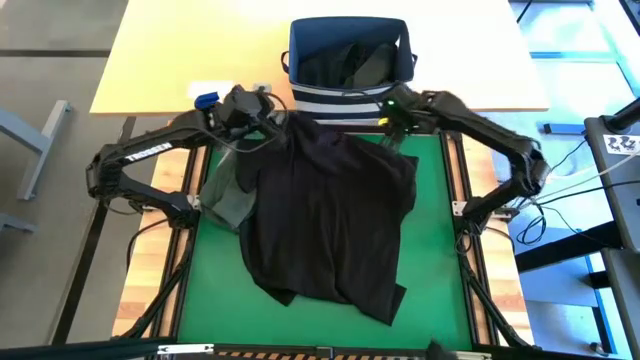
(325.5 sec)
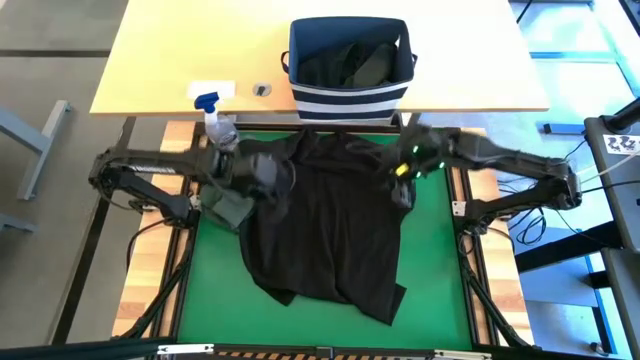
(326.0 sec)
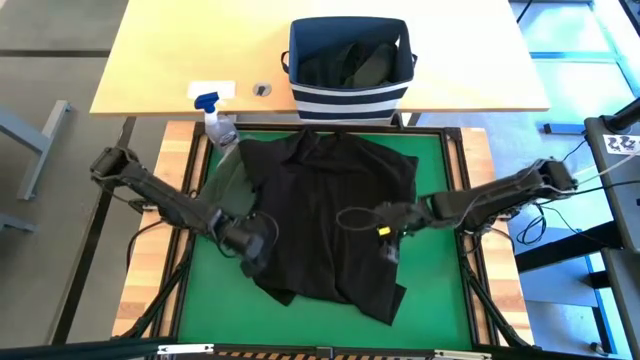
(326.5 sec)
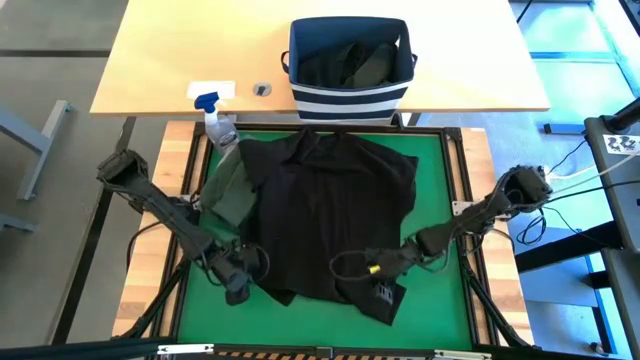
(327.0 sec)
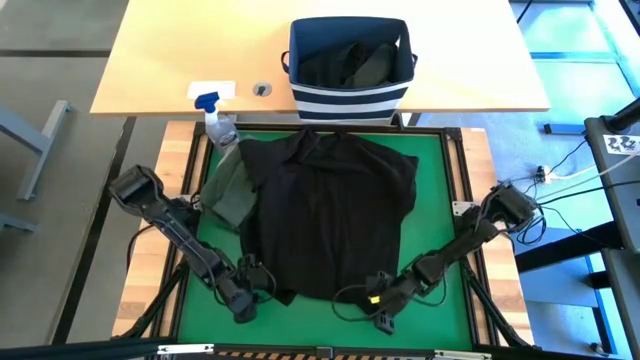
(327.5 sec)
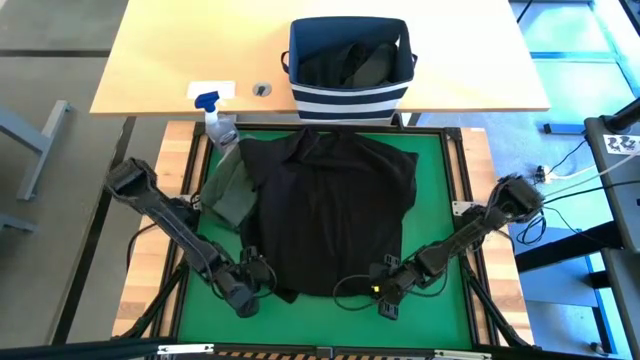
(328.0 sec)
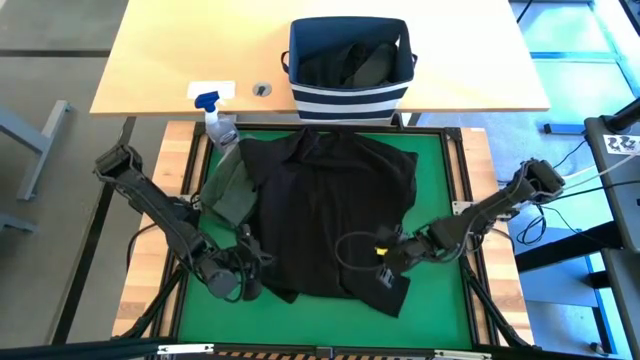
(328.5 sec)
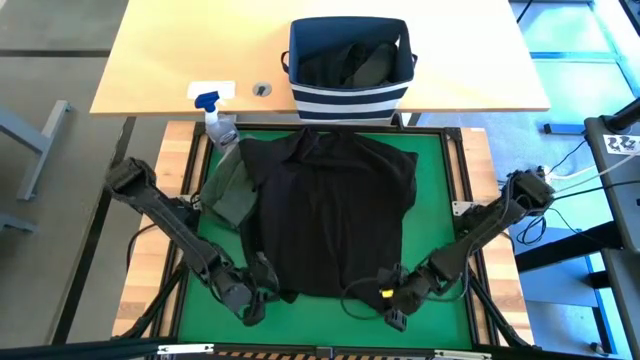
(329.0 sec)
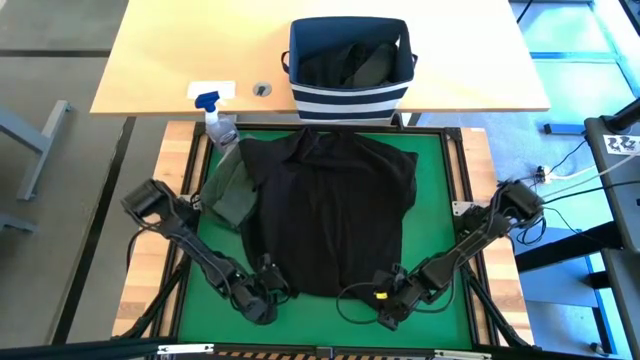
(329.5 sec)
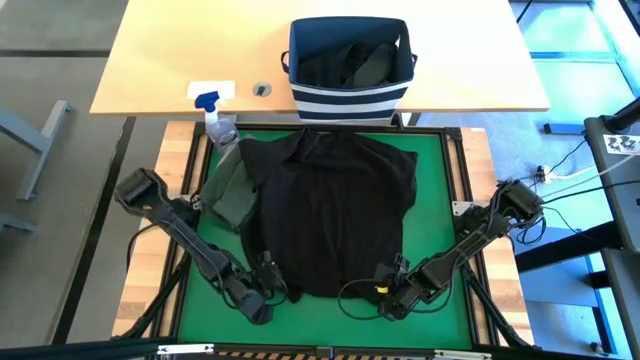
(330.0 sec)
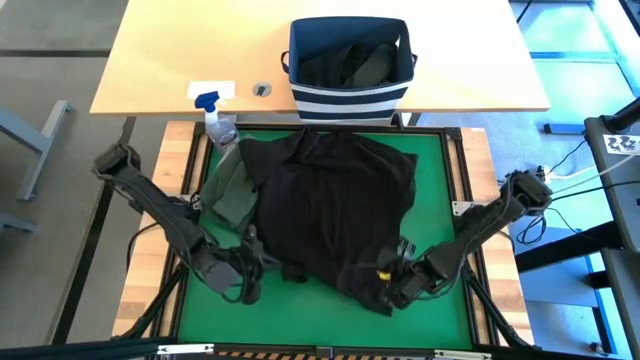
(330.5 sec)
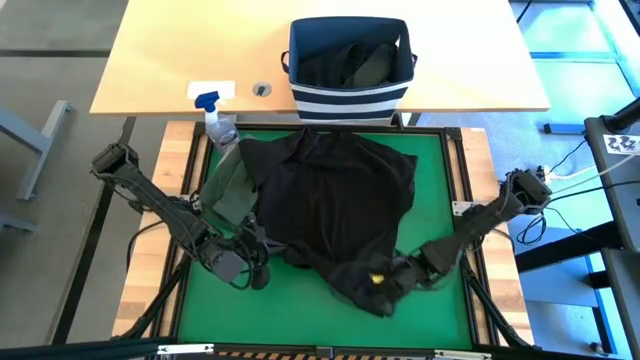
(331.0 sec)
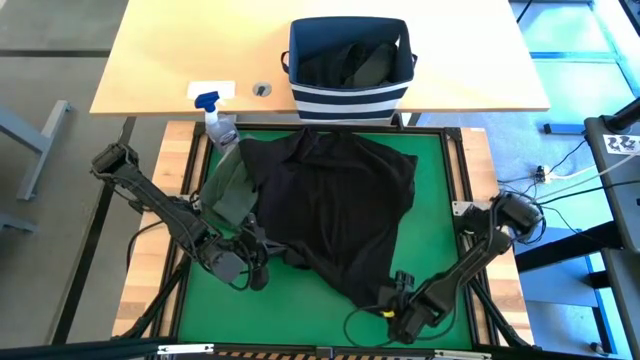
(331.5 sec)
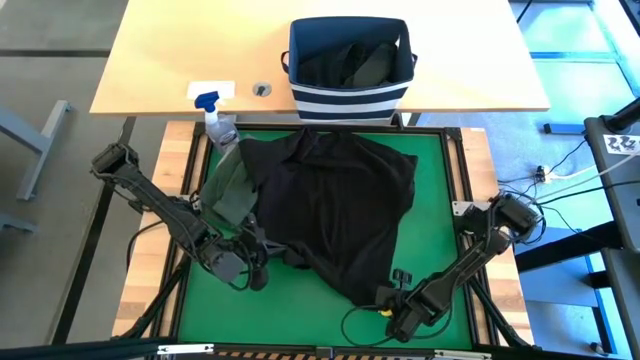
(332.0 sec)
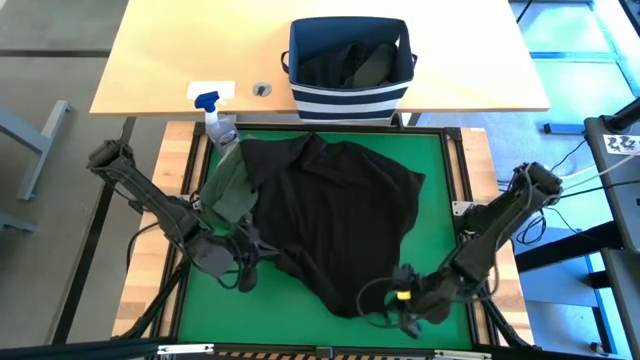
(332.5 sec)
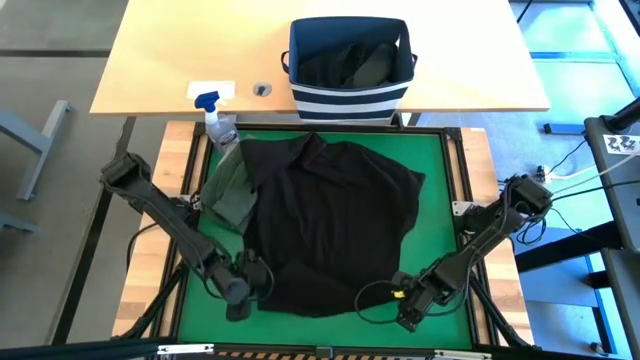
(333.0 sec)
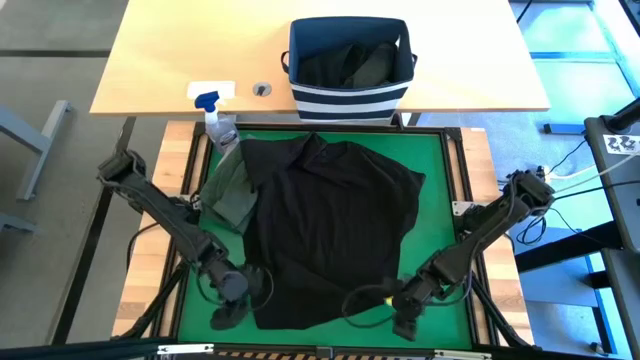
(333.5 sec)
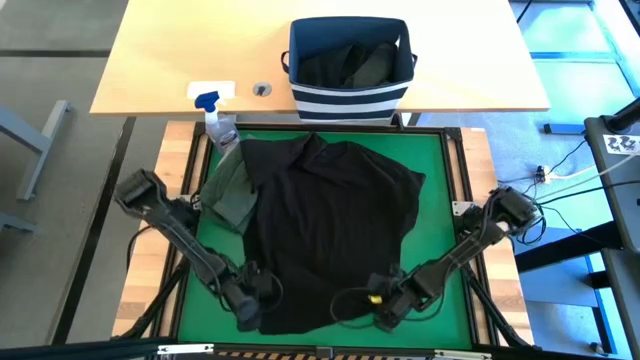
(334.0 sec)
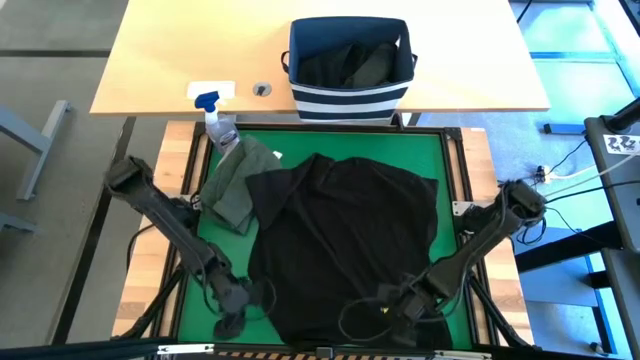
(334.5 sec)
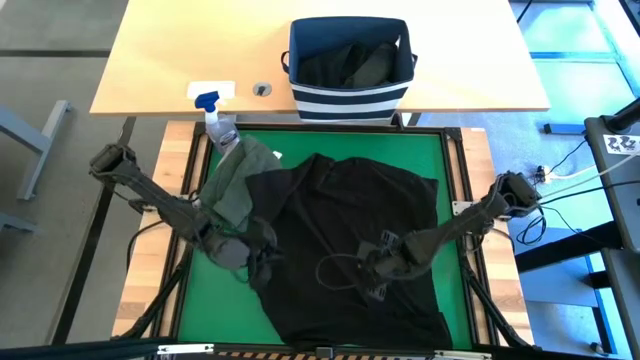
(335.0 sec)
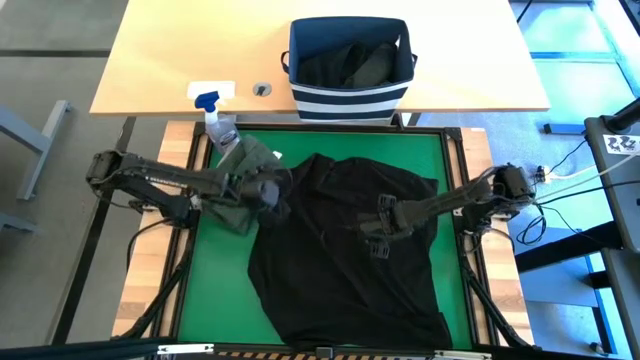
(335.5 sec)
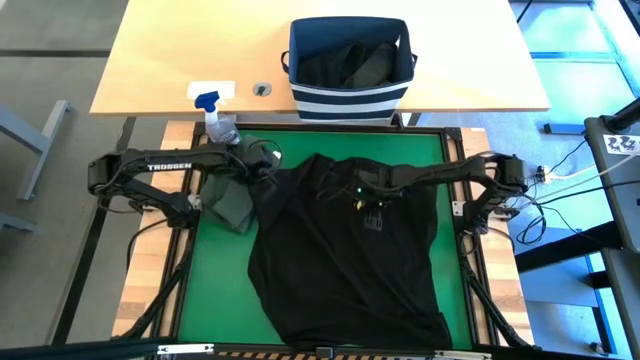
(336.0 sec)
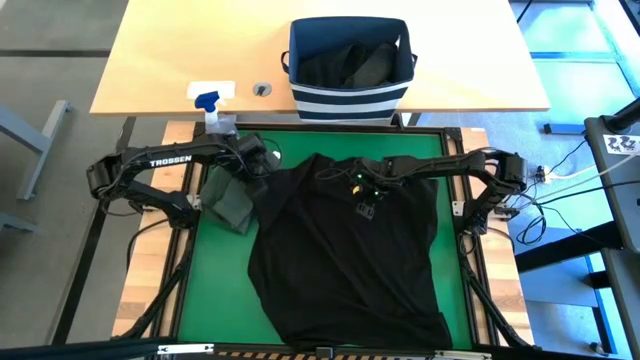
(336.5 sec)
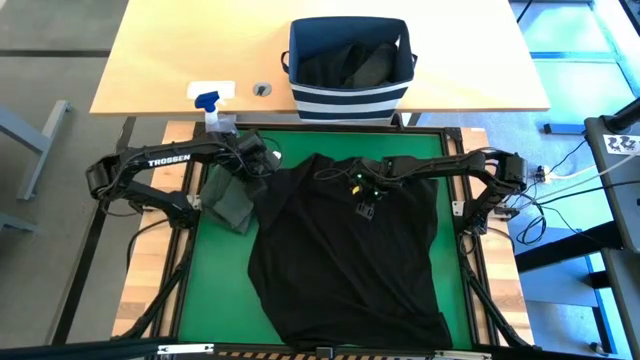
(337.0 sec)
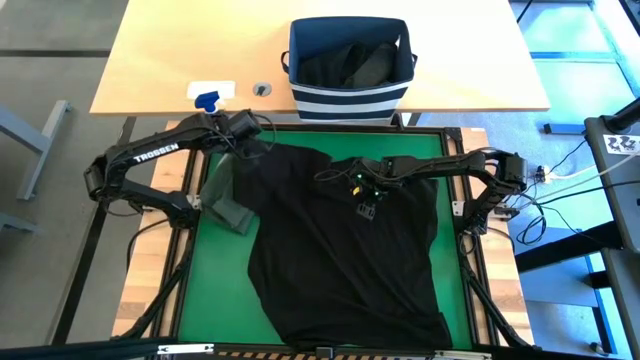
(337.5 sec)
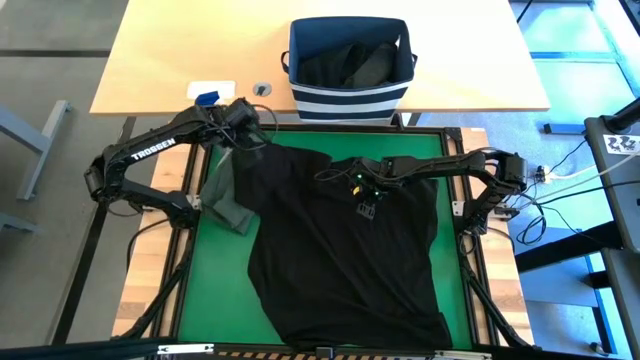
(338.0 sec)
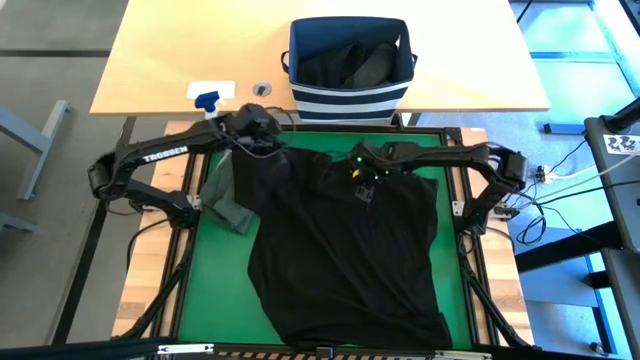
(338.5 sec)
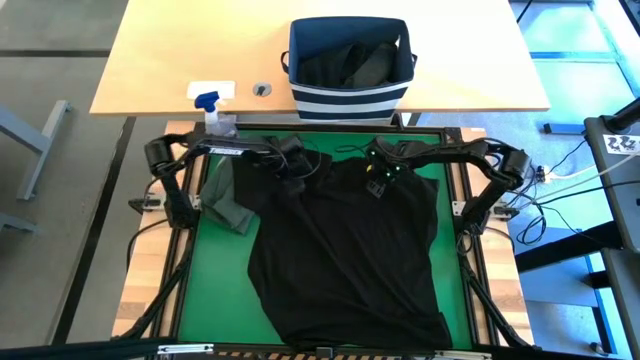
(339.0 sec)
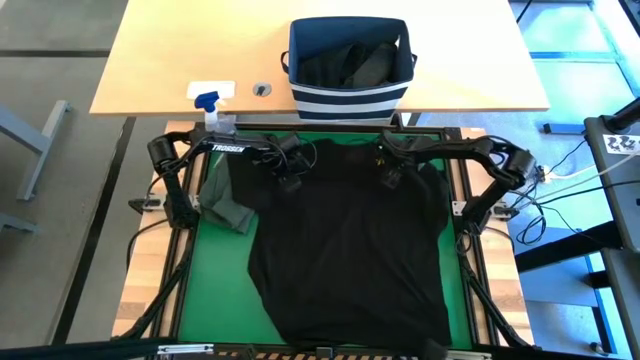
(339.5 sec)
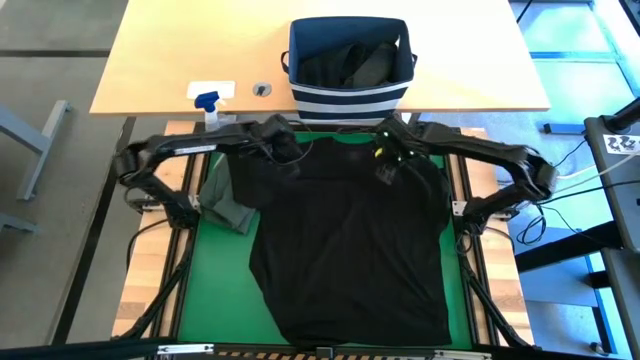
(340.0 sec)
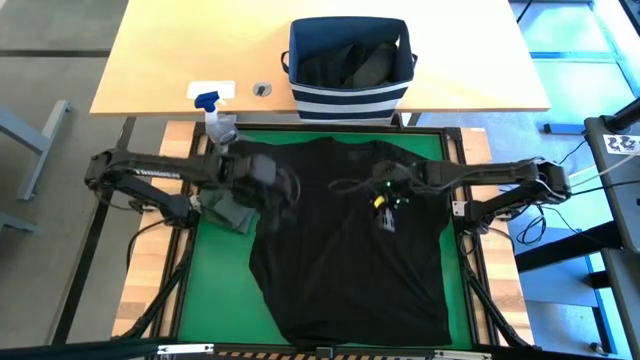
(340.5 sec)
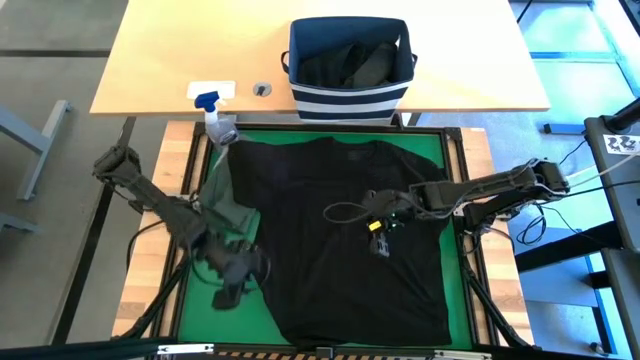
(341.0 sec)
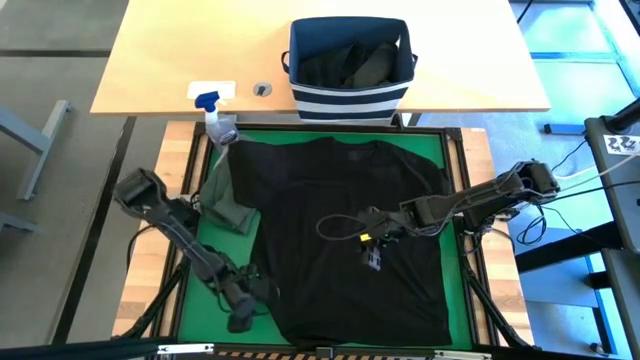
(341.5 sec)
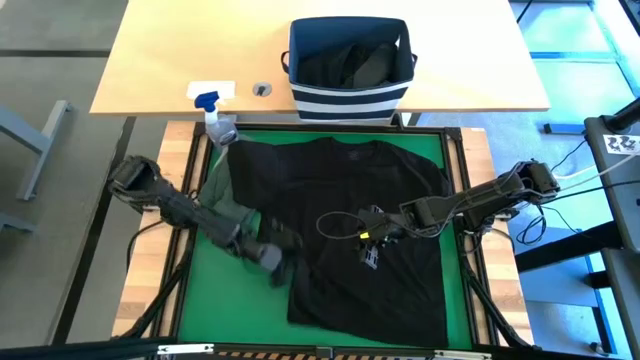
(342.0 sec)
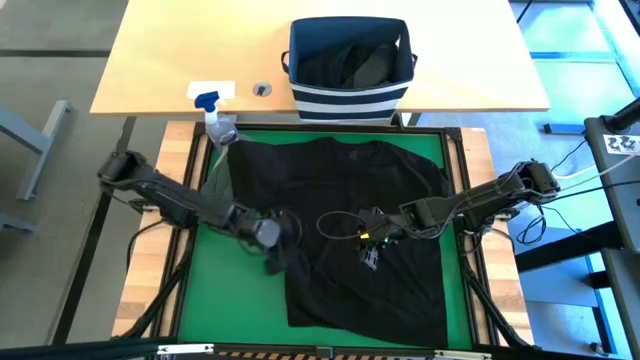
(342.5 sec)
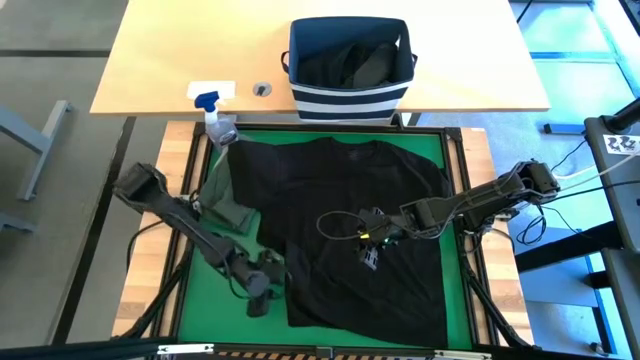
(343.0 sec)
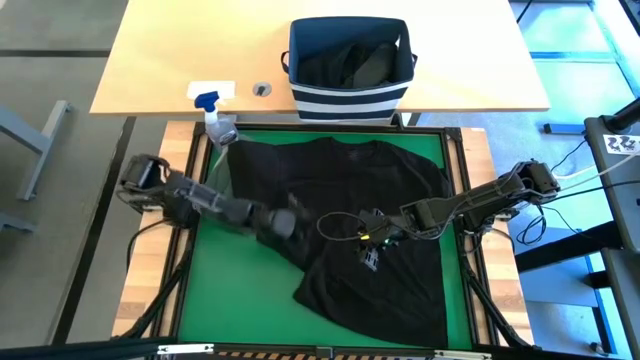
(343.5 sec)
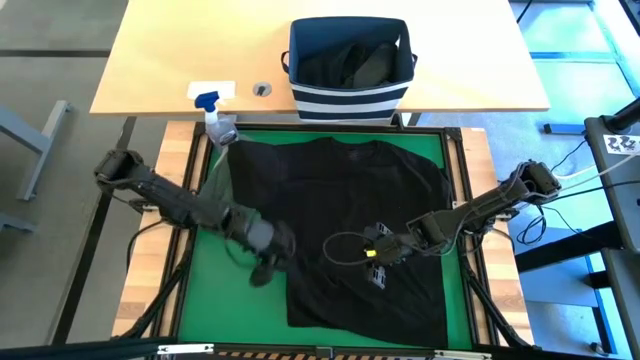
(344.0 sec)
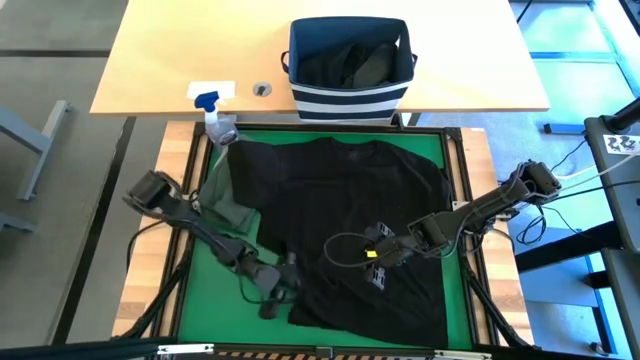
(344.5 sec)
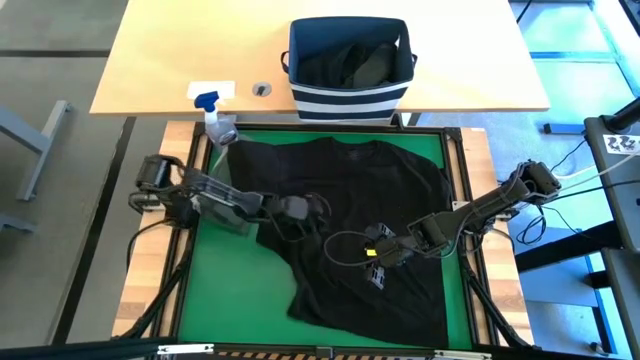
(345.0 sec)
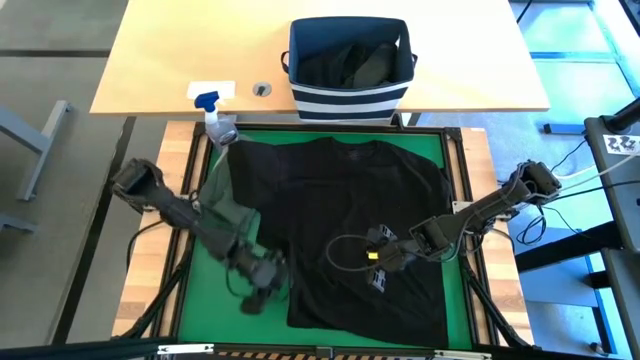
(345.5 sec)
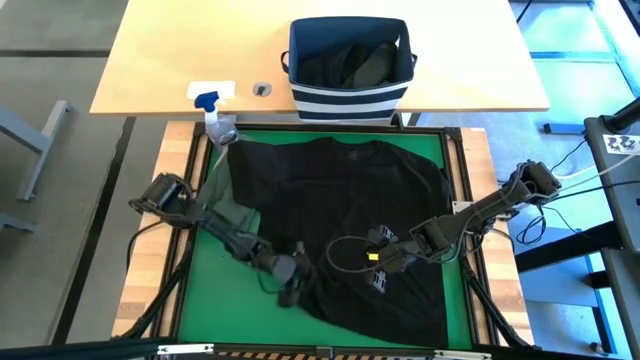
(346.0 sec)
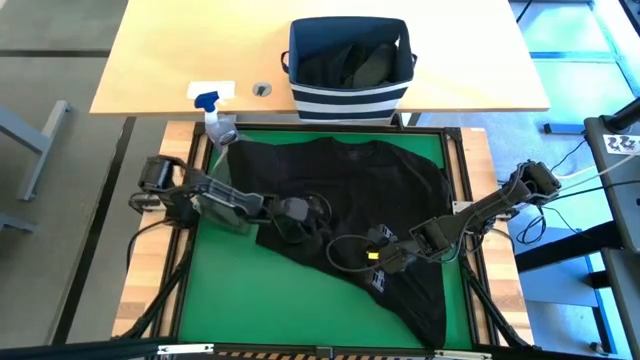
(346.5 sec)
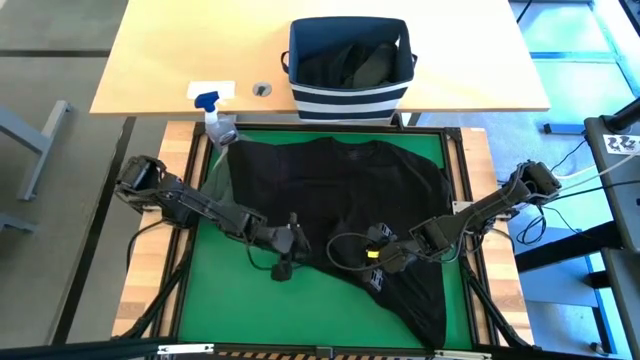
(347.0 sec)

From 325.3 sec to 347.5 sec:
Task: Fold Laundry from Bin
Fold the black shirt
